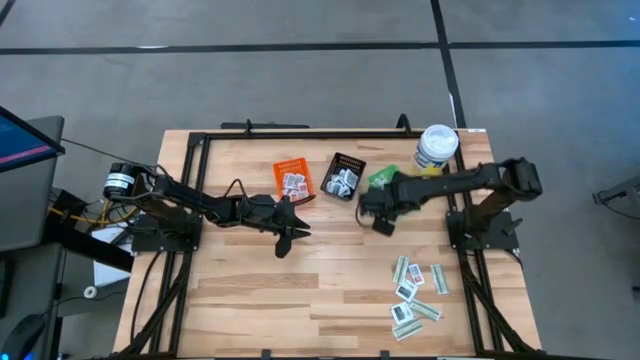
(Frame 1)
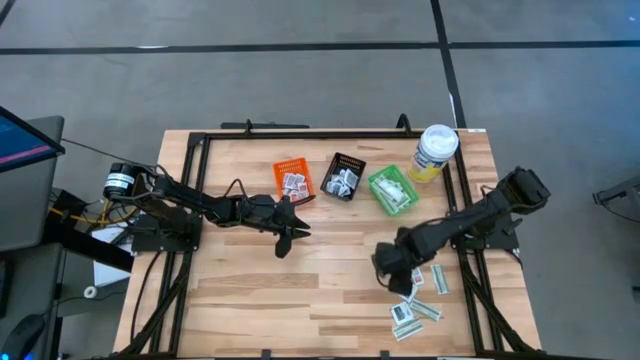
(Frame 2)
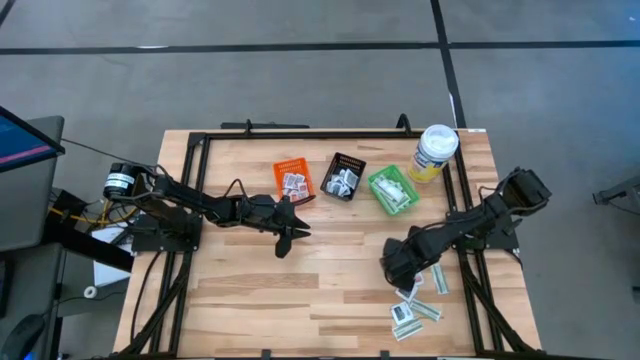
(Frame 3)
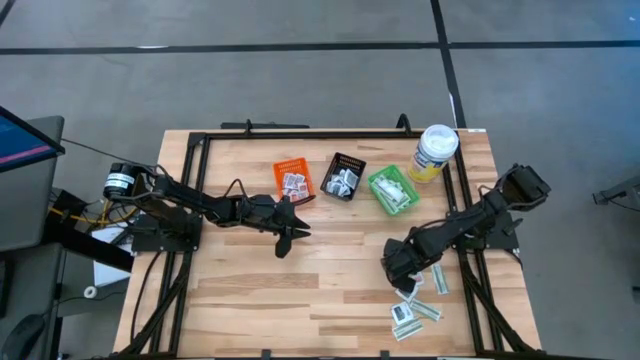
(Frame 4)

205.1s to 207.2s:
Task: Pick & Place First Aid Supplies
Put the green bandage pack into the green basket

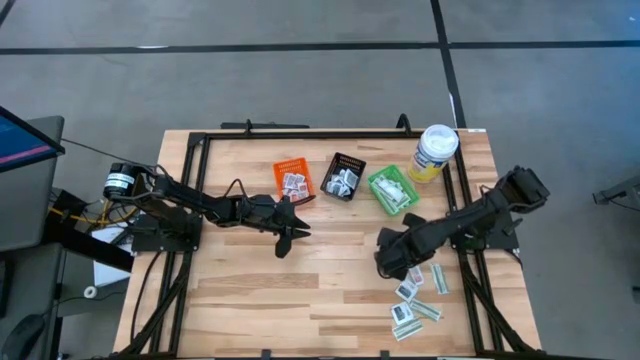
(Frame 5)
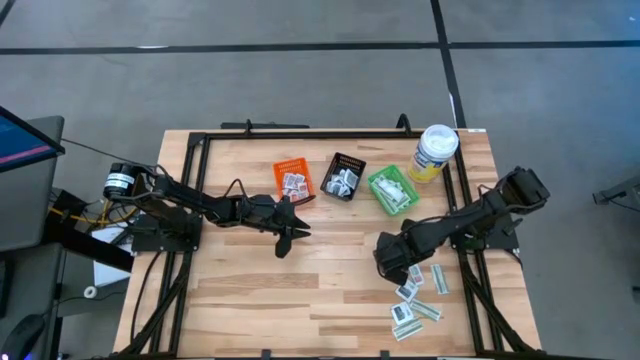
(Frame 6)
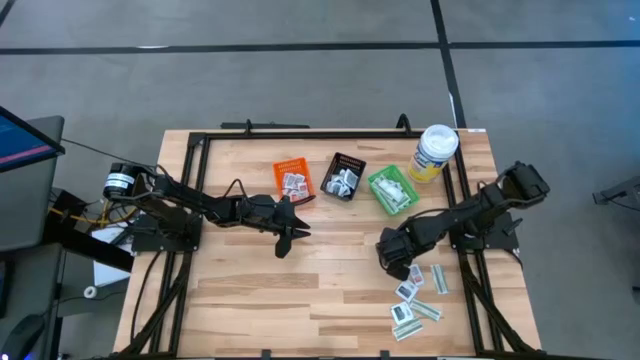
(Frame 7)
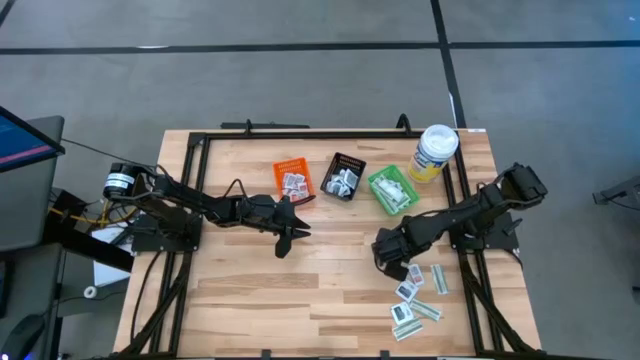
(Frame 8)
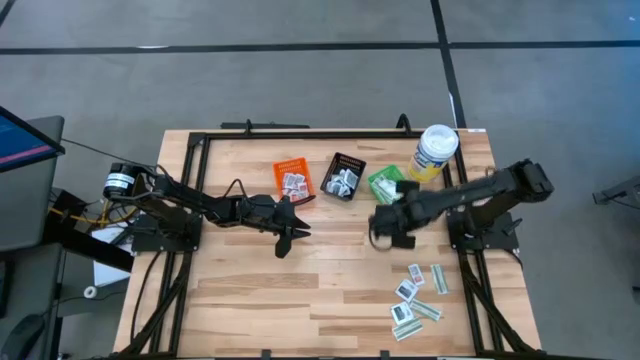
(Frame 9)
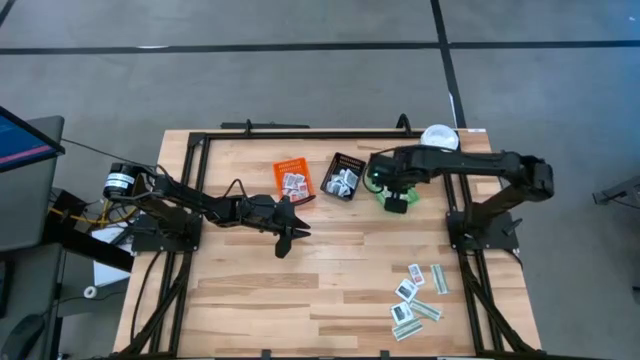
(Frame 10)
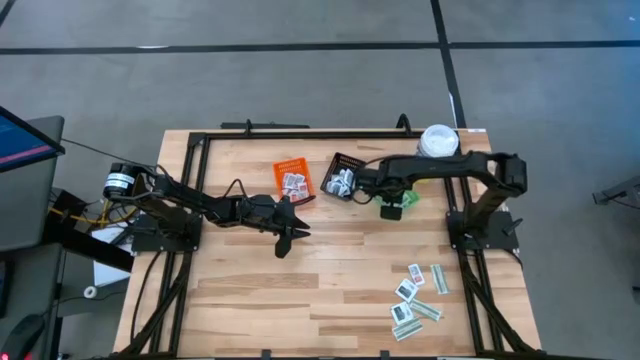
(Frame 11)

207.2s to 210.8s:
Put the green bandage pack into the green basket

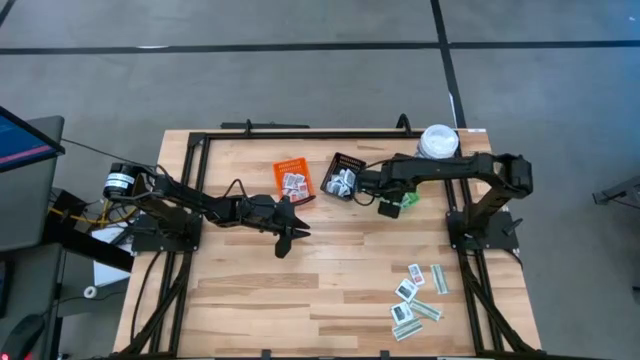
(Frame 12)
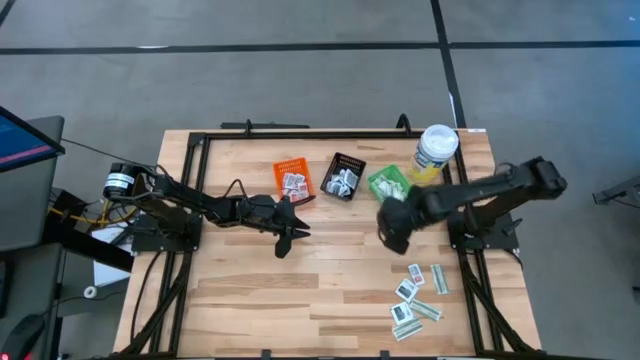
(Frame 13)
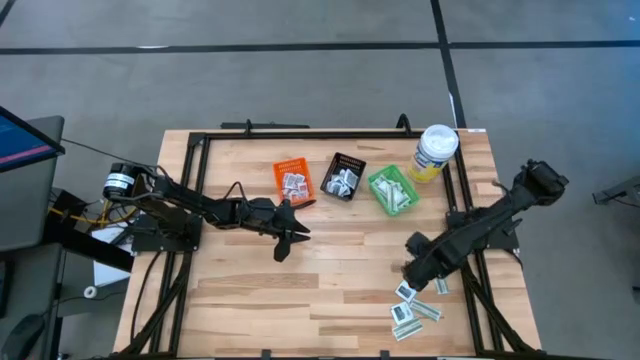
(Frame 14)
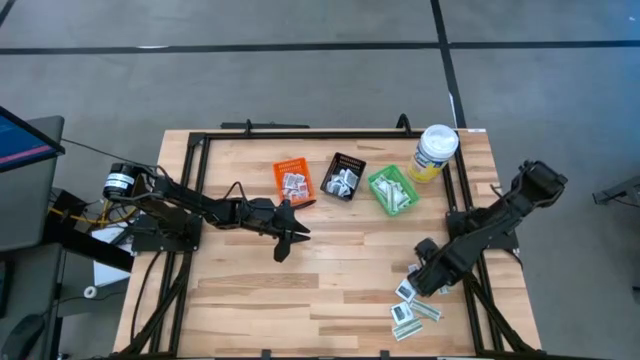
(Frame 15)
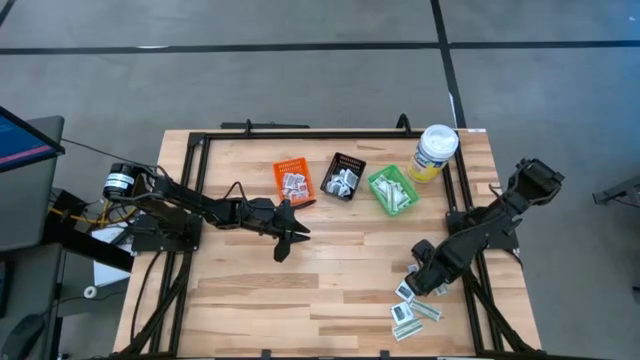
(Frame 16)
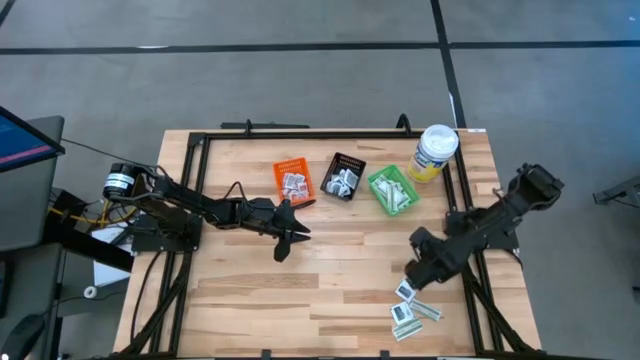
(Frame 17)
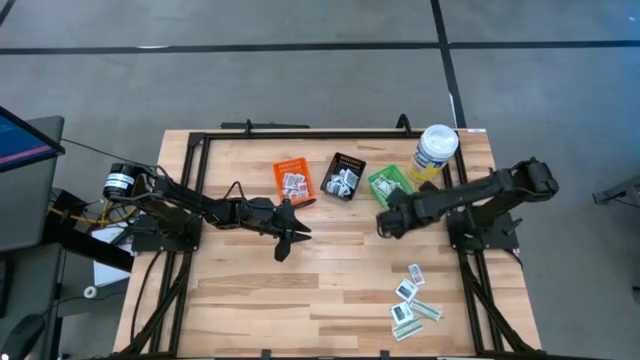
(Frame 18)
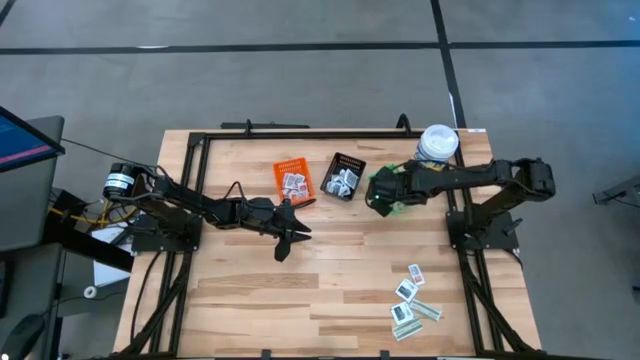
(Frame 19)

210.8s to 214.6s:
Put the green bandage pack into the green basket

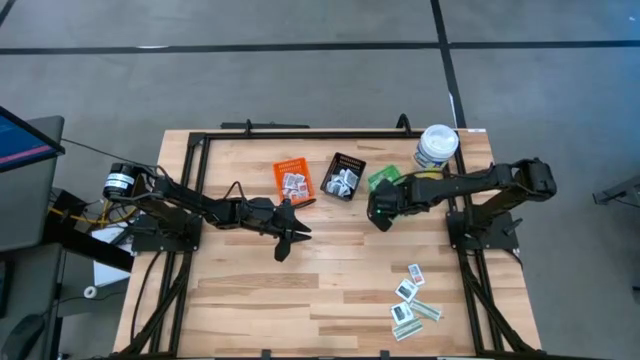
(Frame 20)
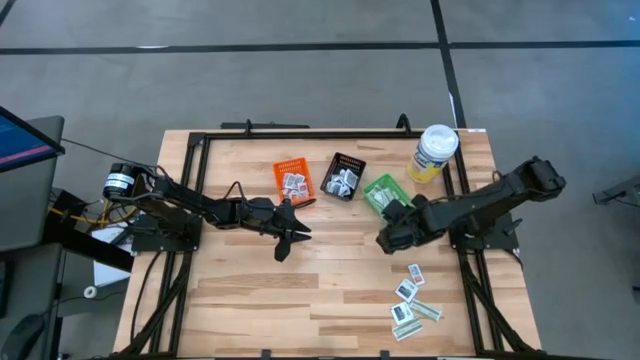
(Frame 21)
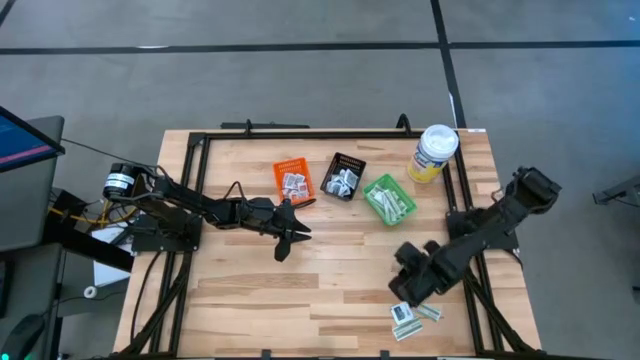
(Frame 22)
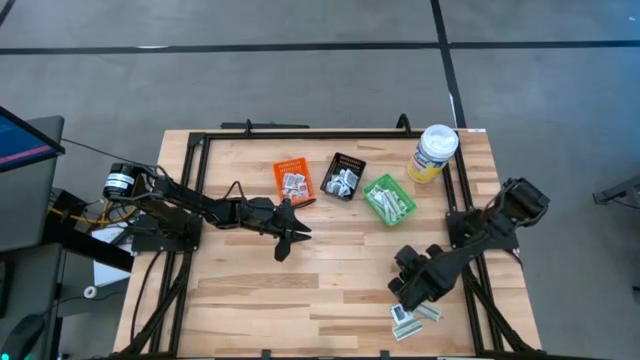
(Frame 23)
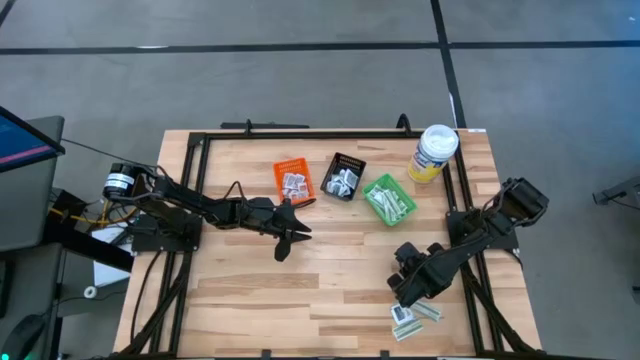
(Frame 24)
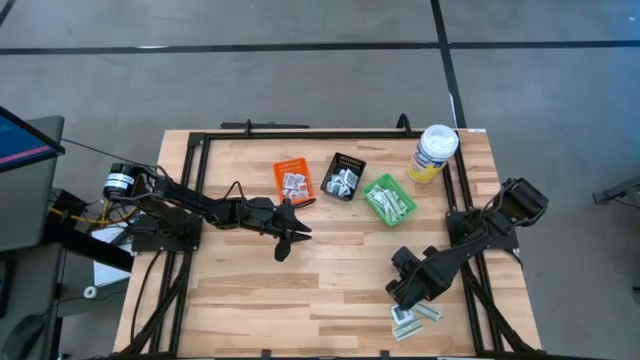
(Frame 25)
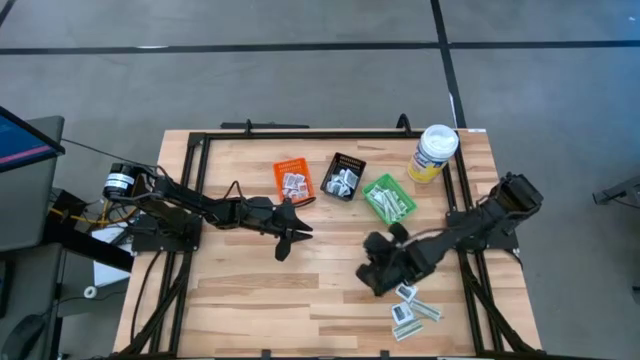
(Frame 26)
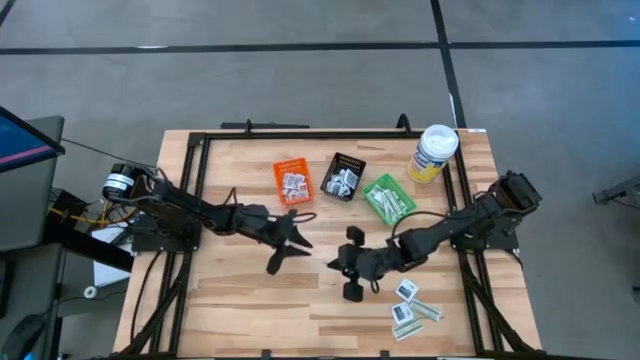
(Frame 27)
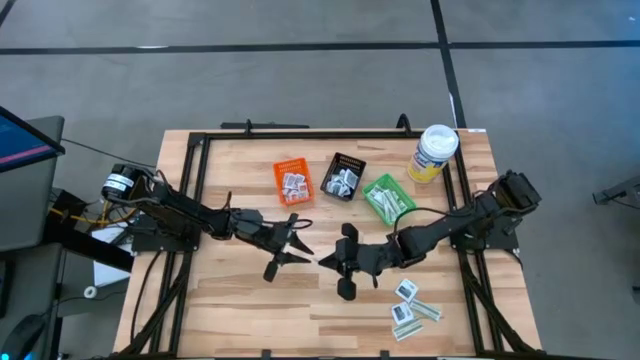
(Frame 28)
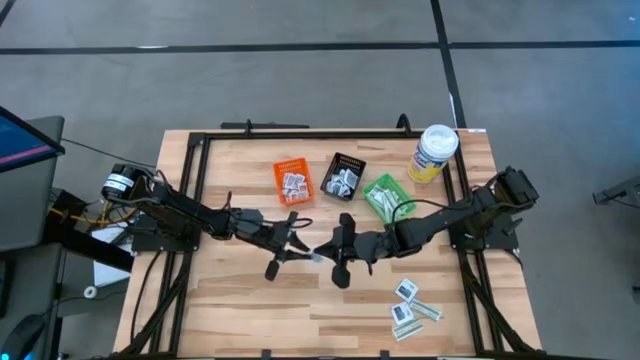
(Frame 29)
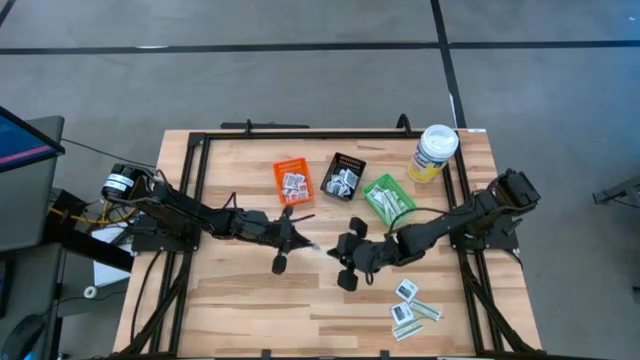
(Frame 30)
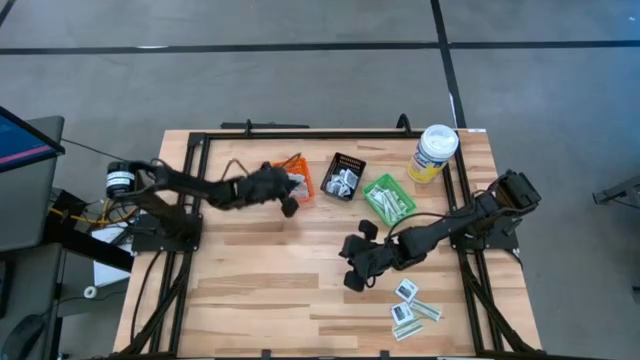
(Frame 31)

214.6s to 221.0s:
Put the orange ointment pack into the orange basket

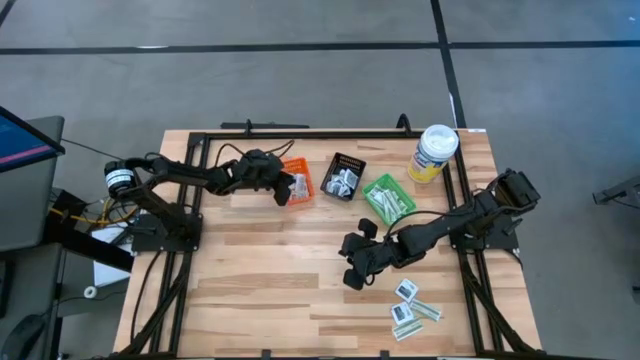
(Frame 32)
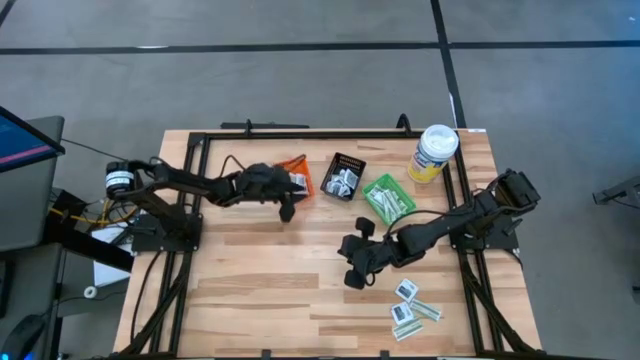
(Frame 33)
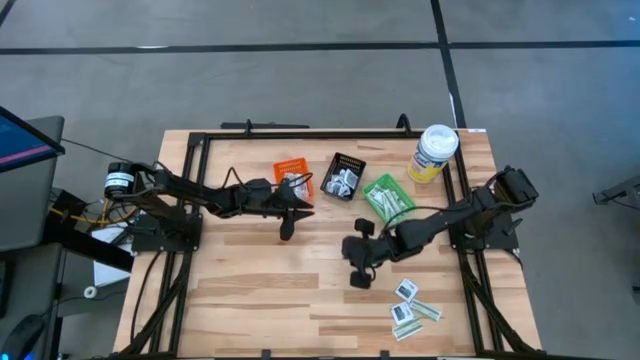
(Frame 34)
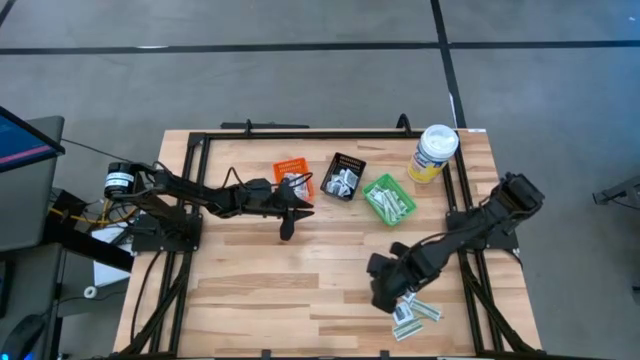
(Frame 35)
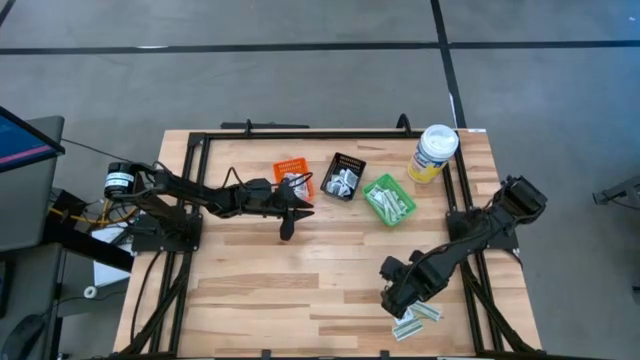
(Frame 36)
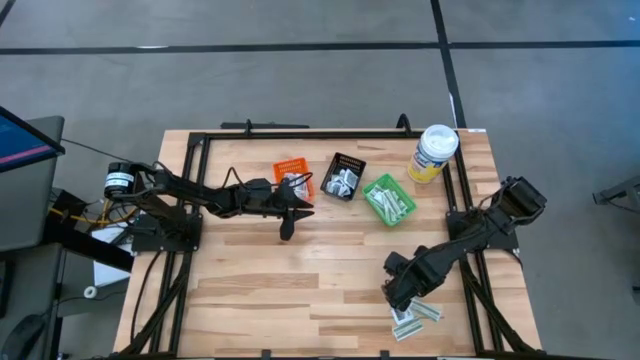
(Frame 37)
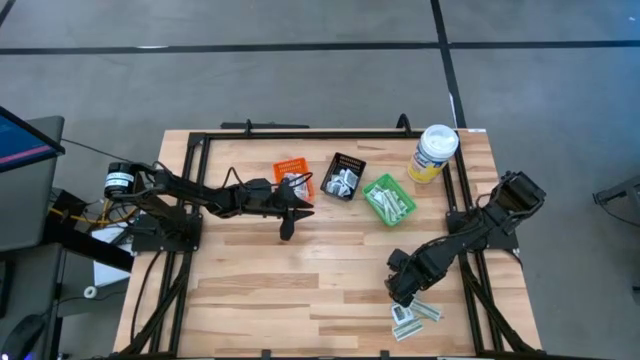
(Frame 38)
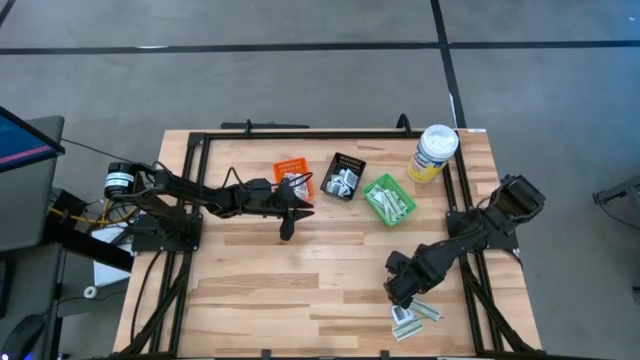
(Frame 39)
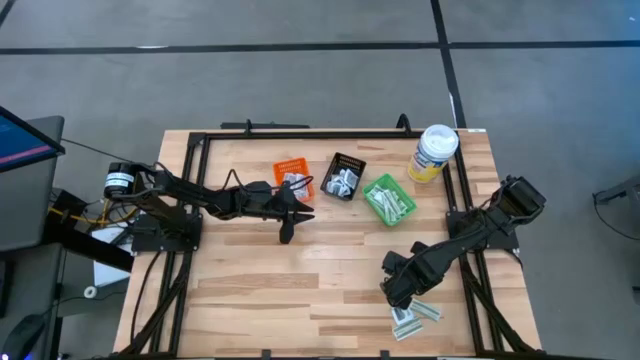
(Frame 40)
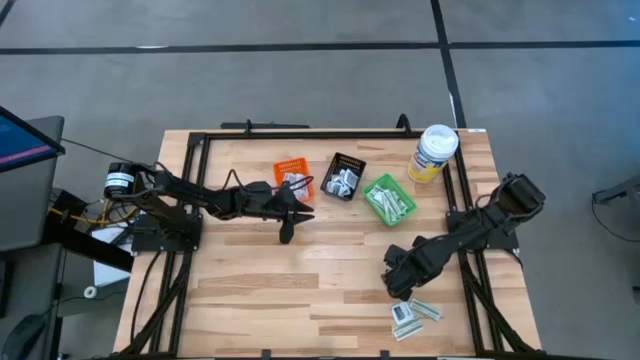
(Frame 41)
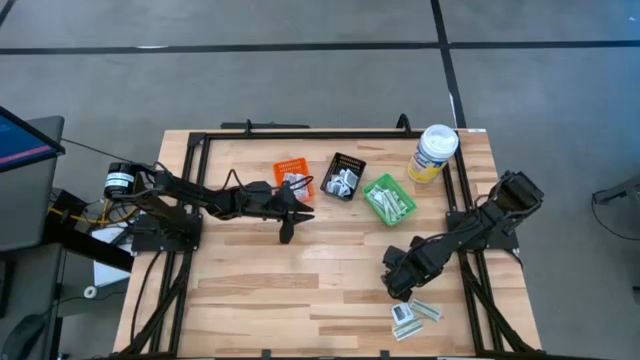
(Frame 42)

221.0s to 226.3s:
Put the black towelette pack into the black basket

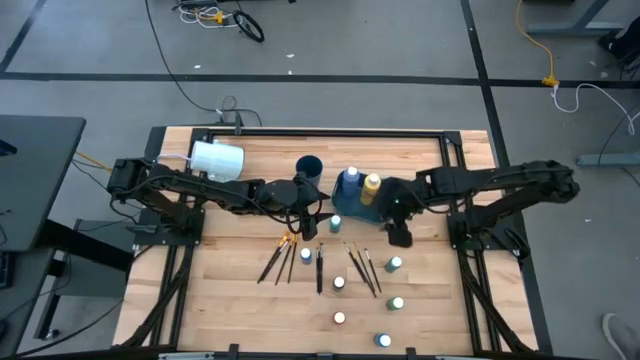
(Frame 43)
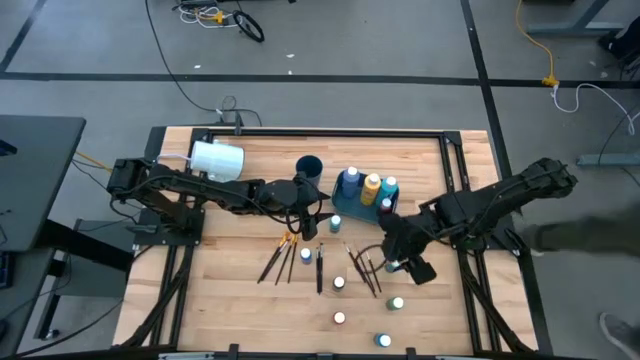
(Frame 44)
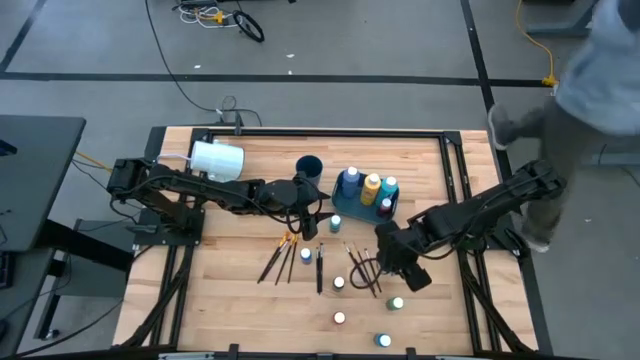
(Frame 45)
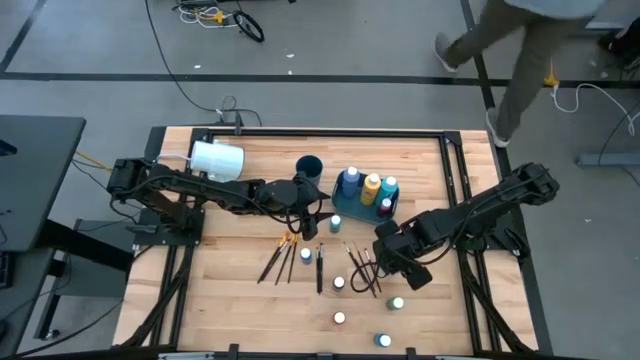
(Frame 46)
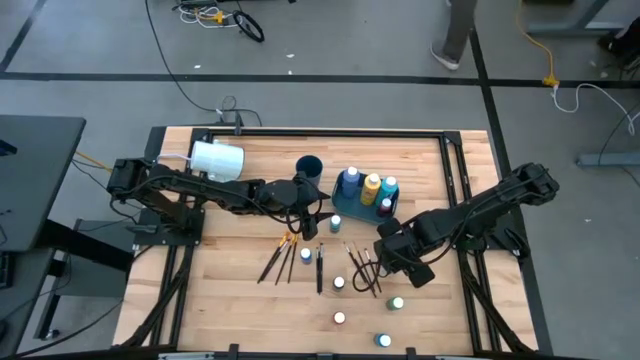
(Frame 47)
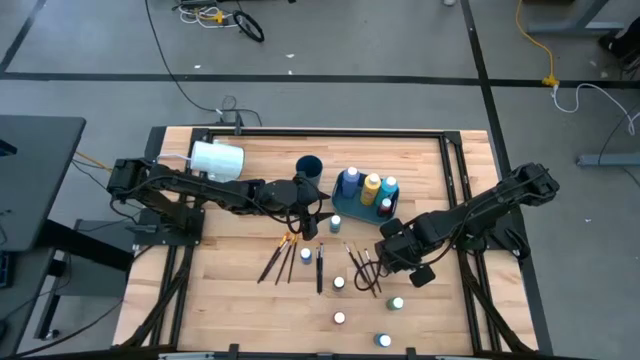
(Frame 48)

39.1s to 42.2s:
Task: Pick & Place Paint Supplies
Put the small light blue paint bottle into the blue bin
